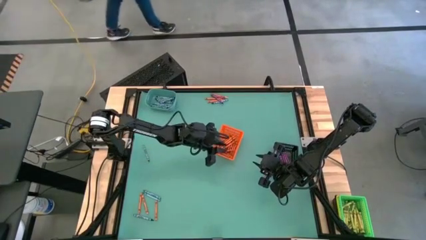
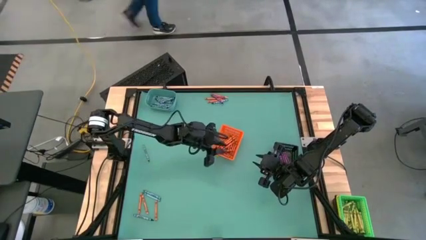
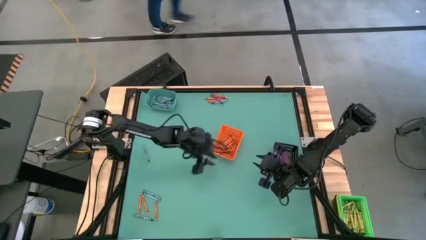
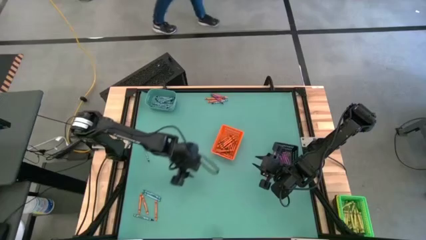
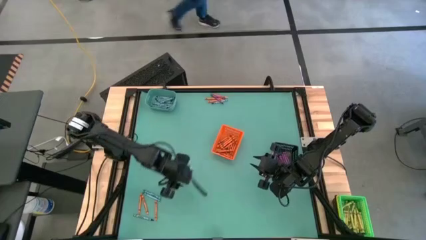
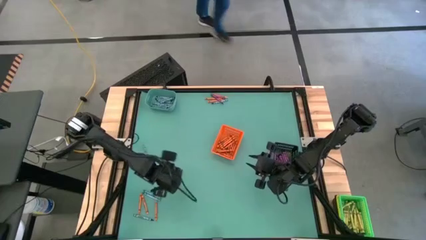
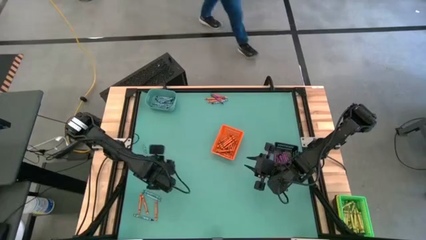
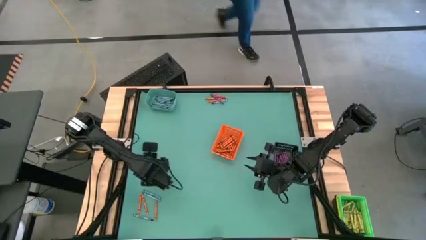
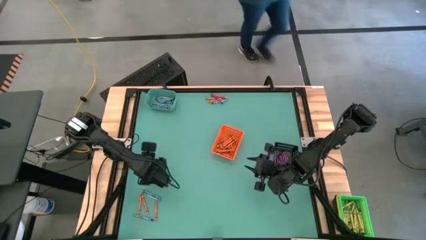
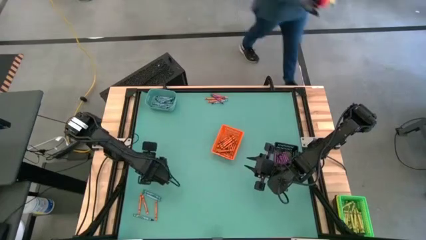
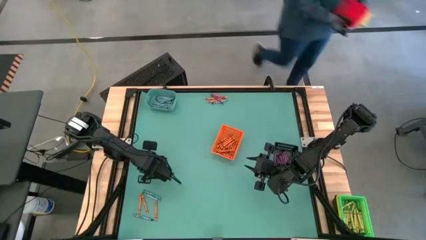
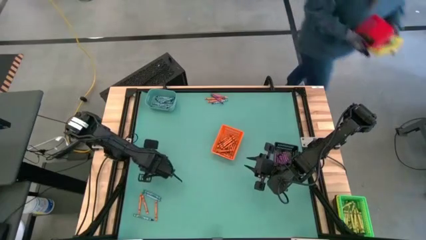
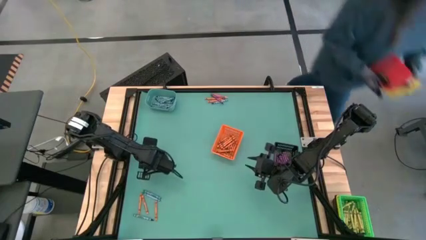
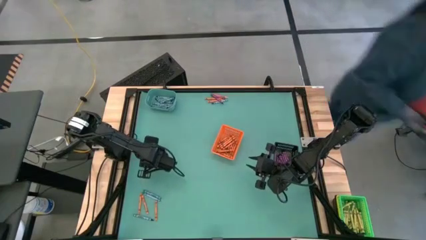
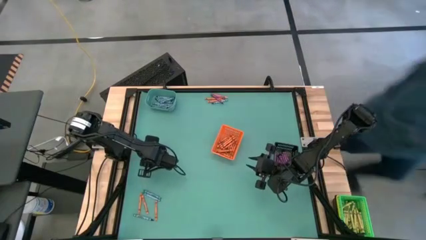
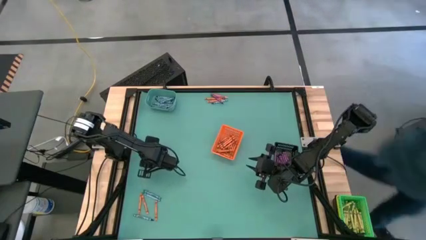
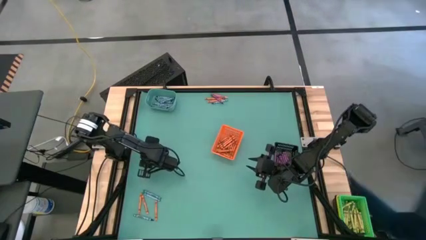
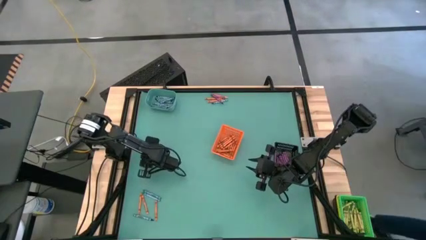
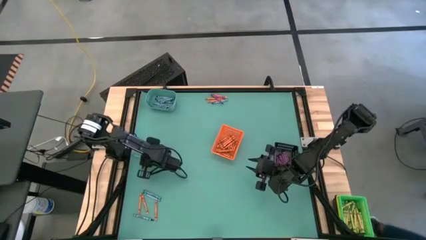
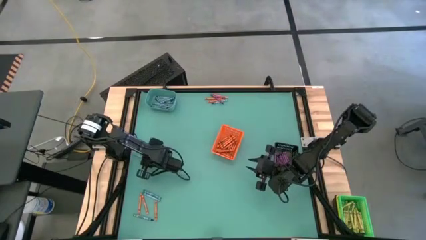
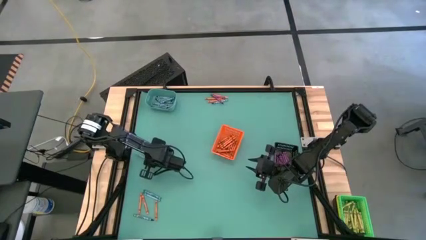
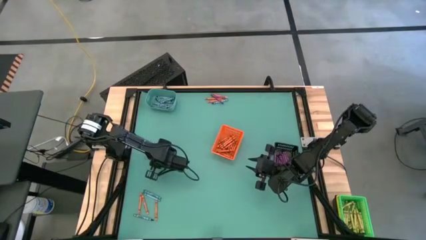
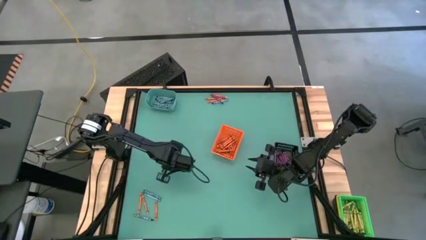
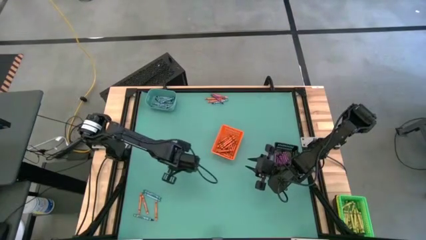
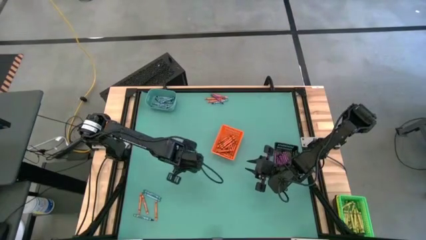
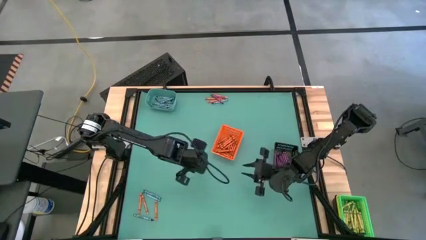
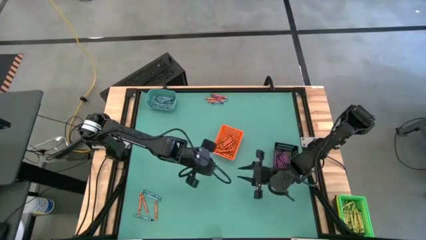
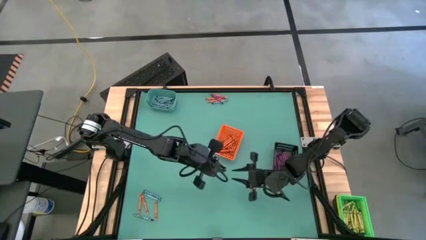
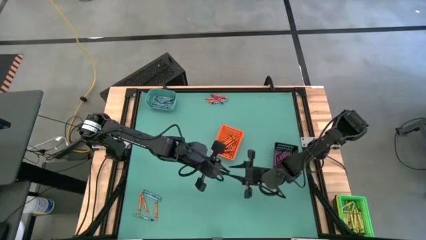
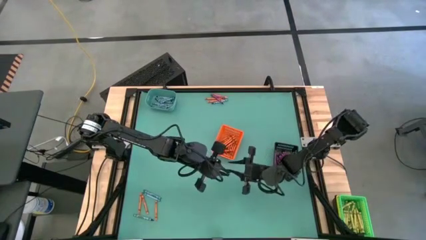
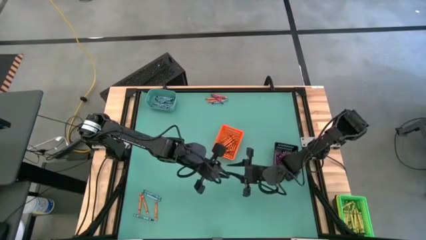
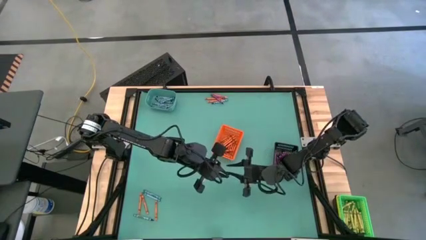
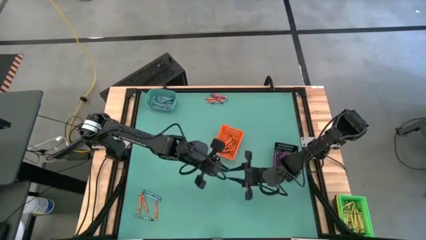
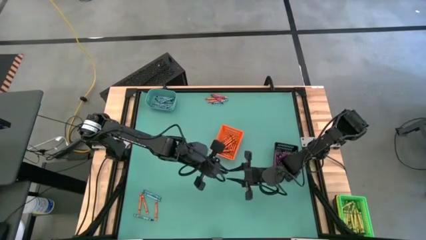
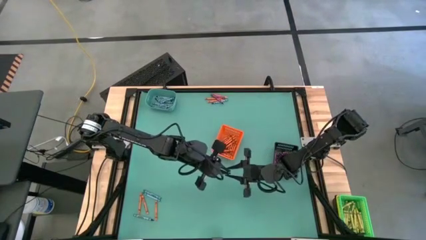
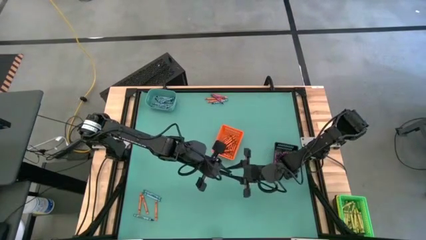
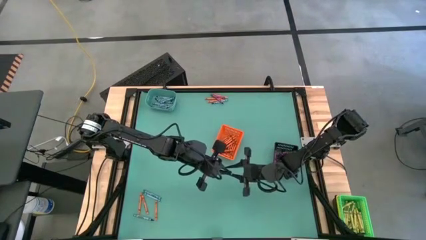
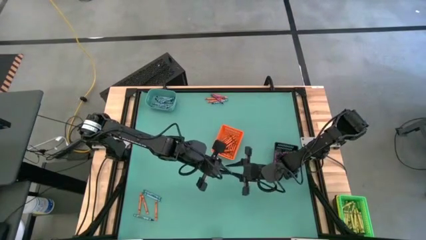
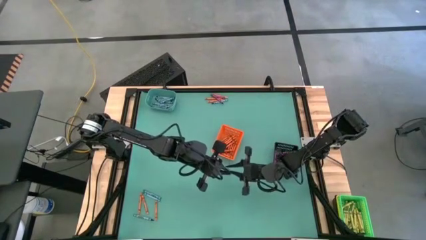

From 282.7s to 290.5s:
Task: Sort crayons
Put the blue crayon into the blue bin

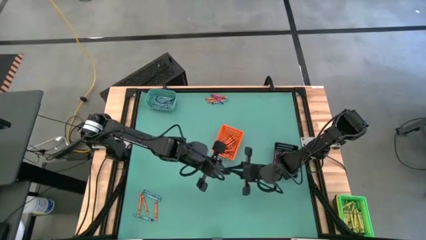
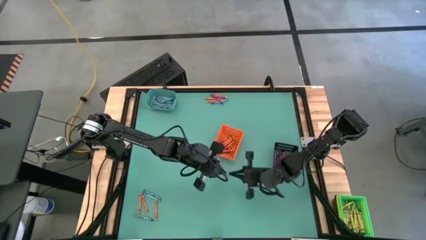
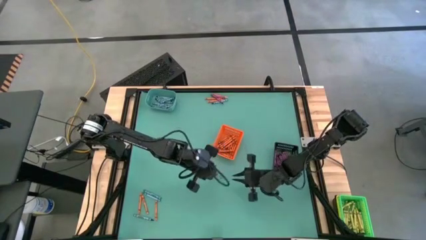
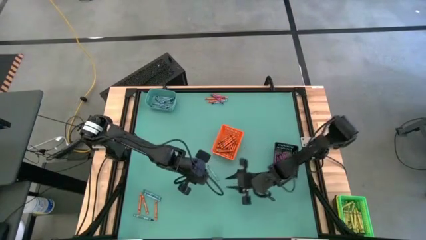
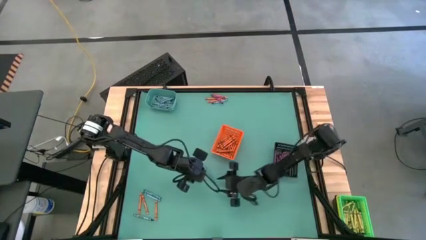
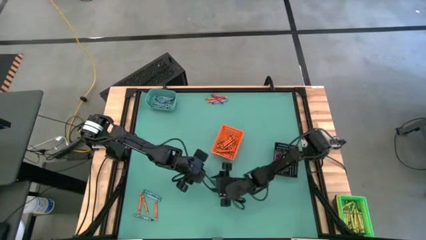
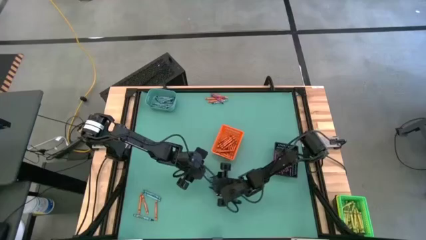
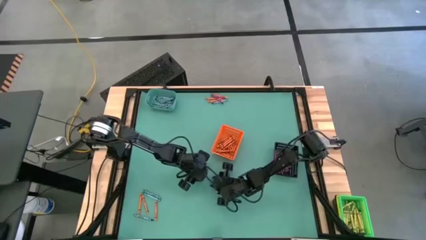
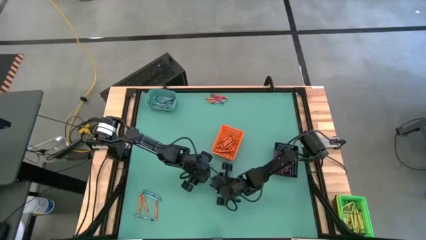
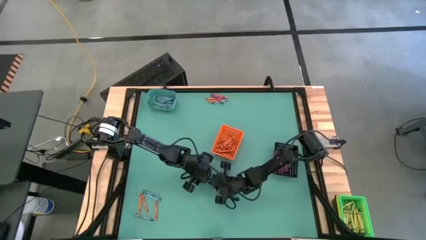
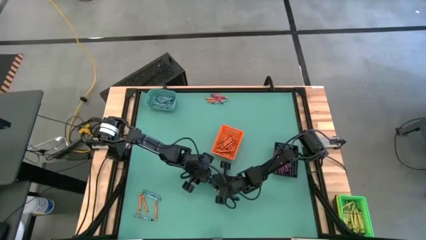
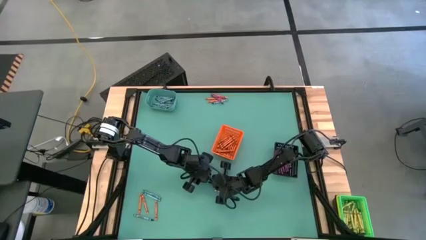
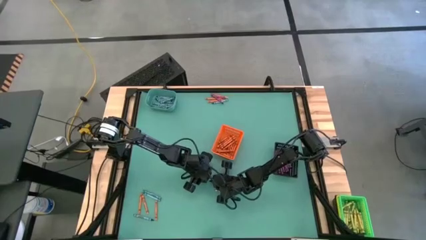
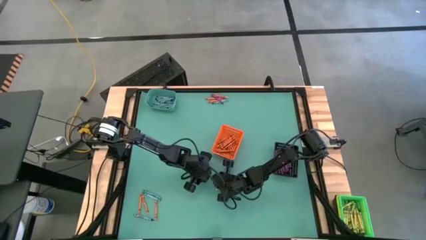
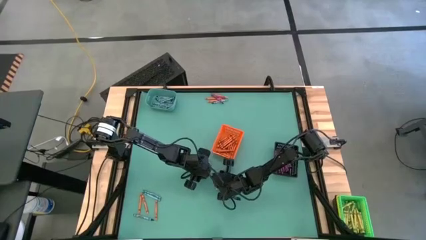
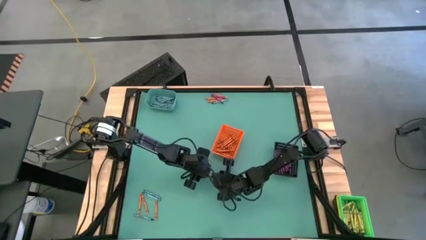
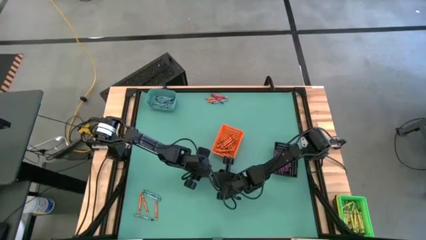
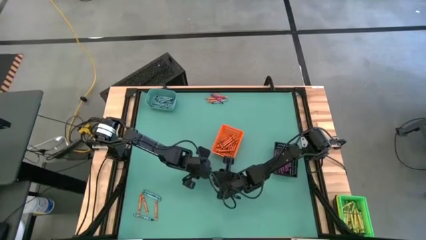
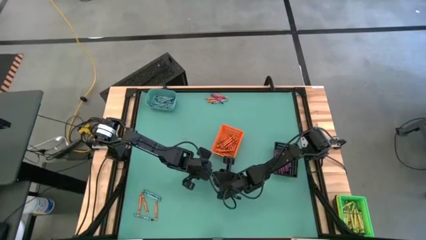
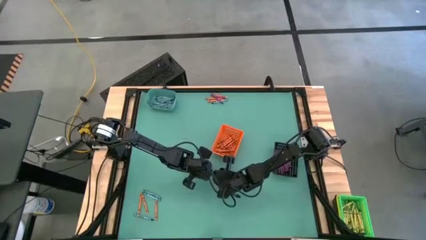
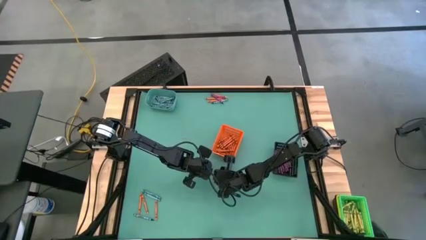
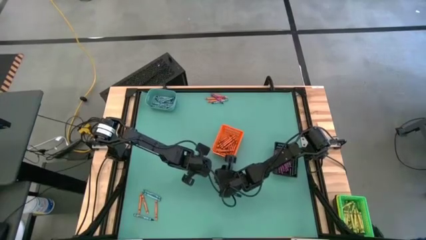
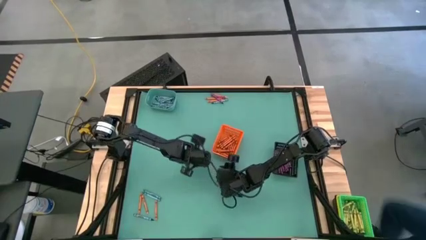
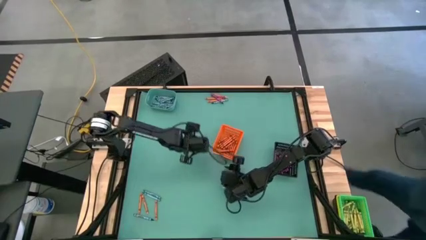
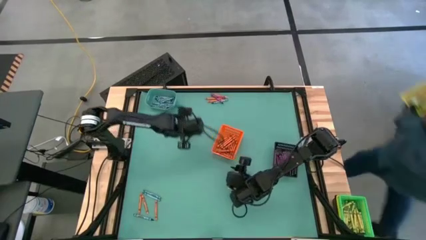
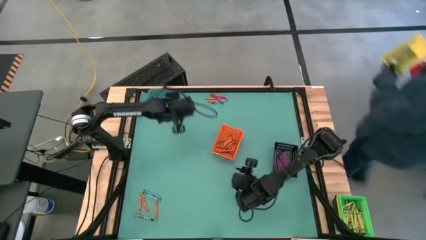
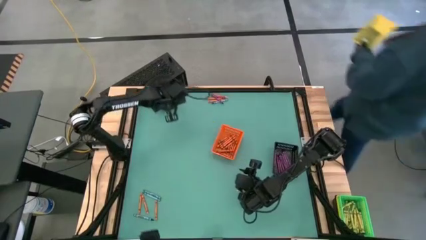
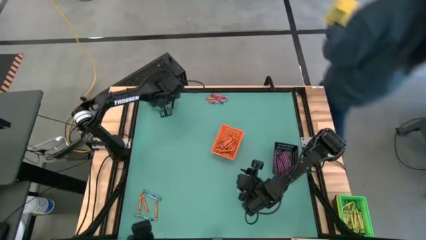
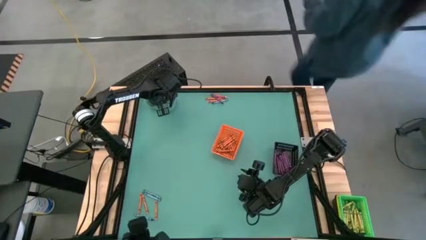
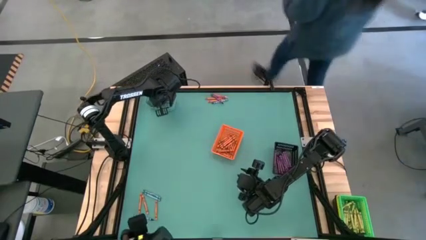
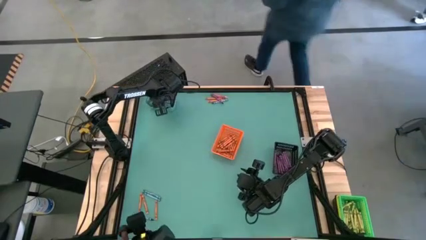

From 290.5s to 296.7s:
Put the blue crayon into the blue bin
